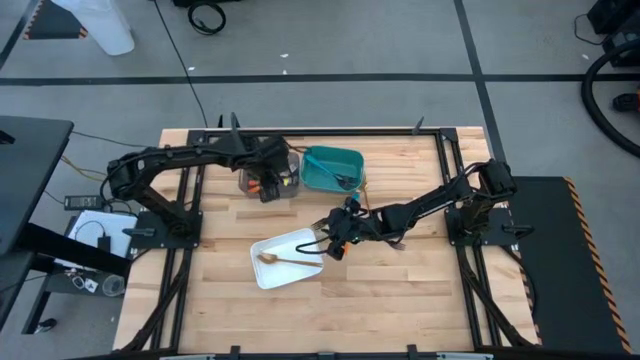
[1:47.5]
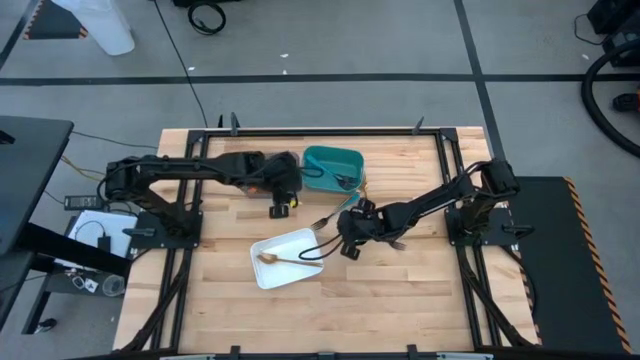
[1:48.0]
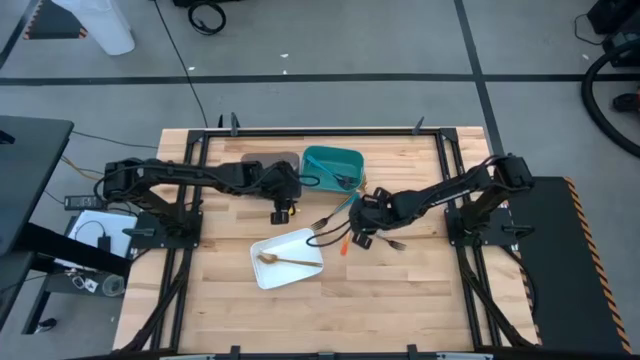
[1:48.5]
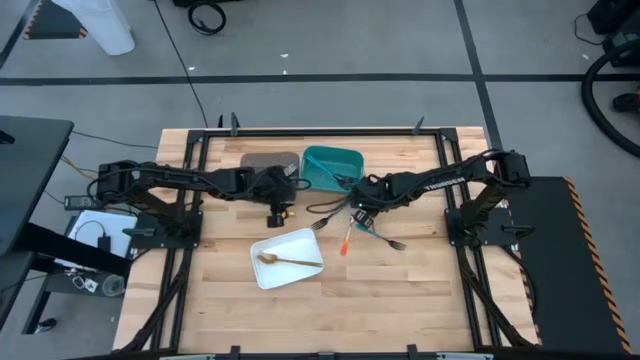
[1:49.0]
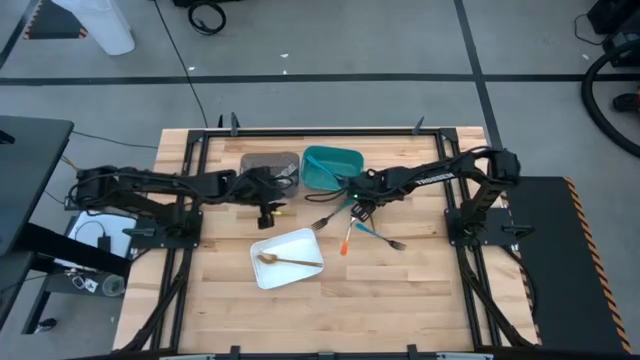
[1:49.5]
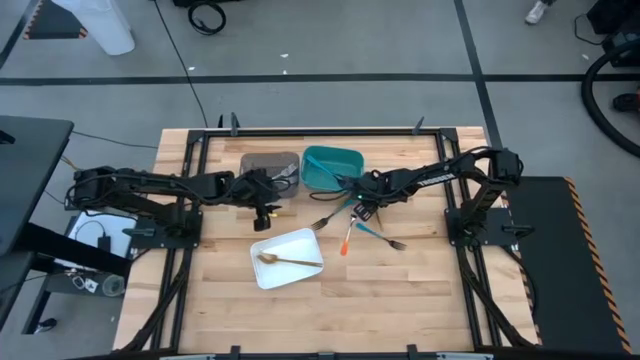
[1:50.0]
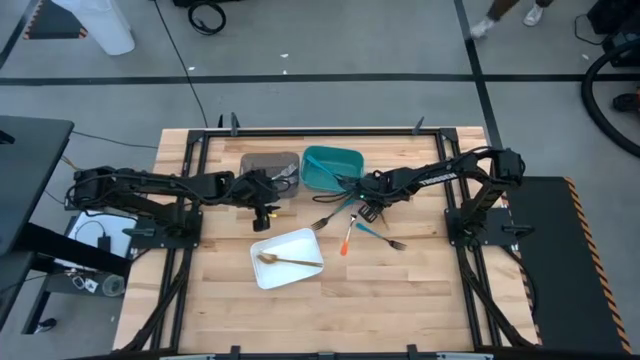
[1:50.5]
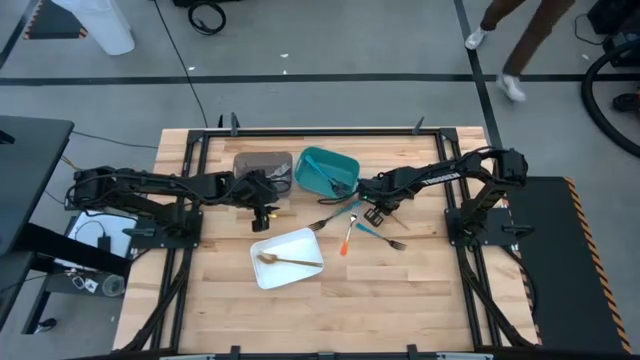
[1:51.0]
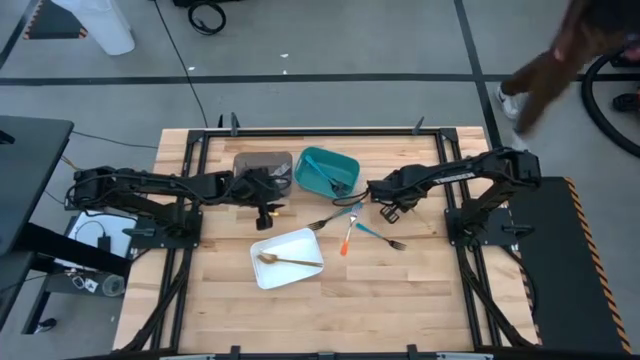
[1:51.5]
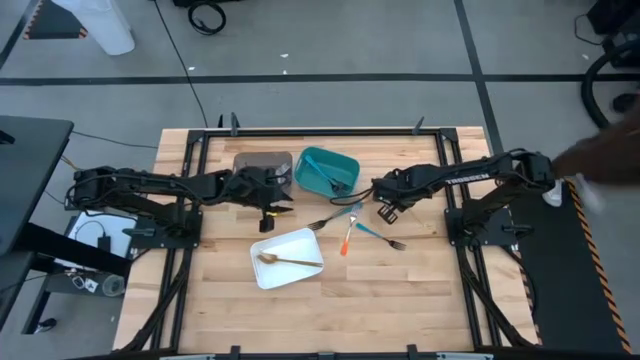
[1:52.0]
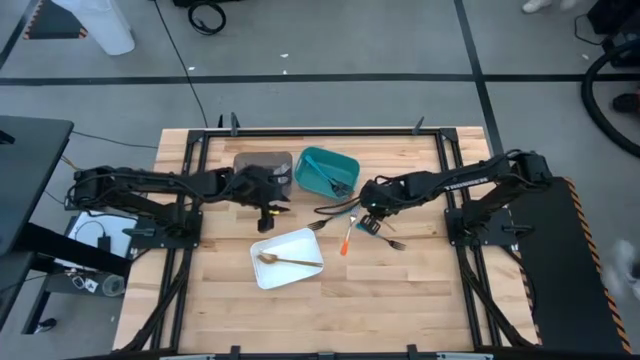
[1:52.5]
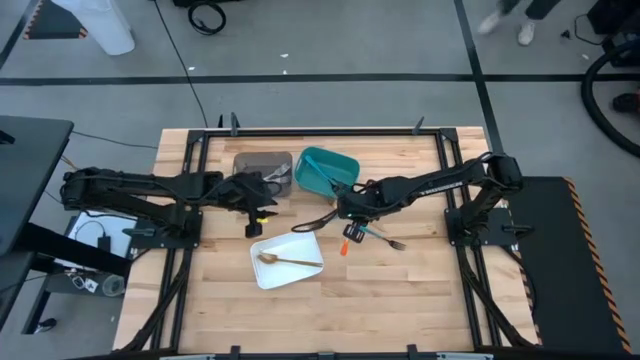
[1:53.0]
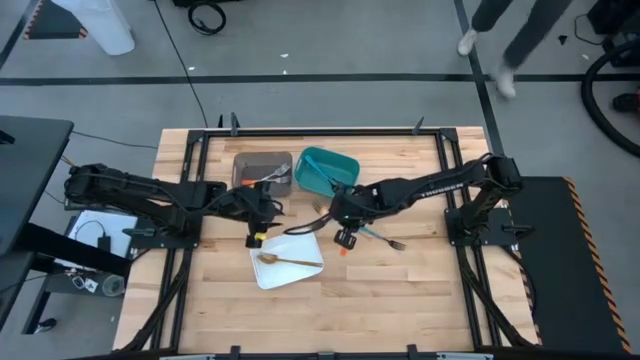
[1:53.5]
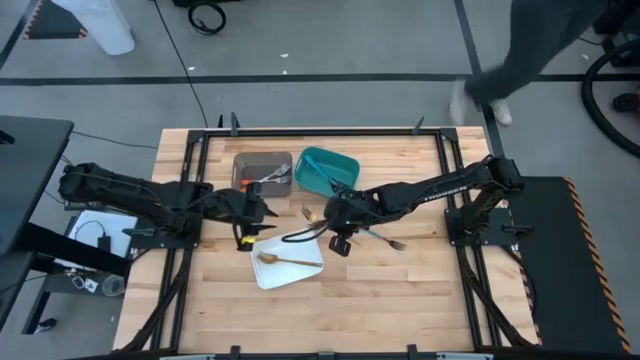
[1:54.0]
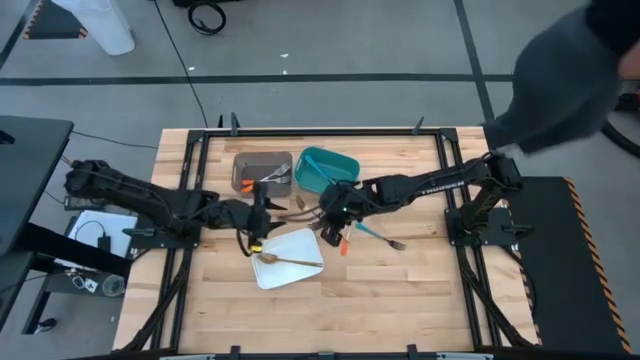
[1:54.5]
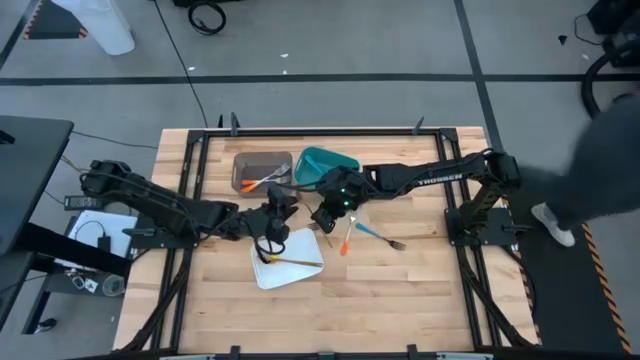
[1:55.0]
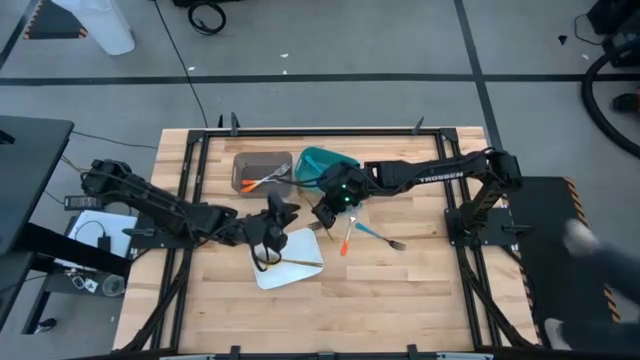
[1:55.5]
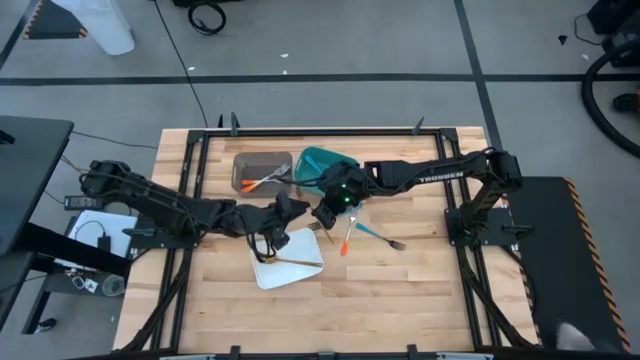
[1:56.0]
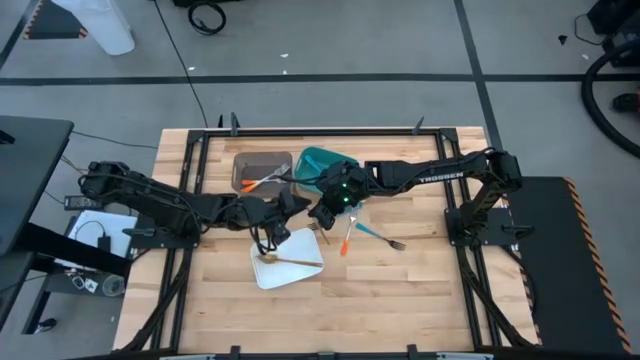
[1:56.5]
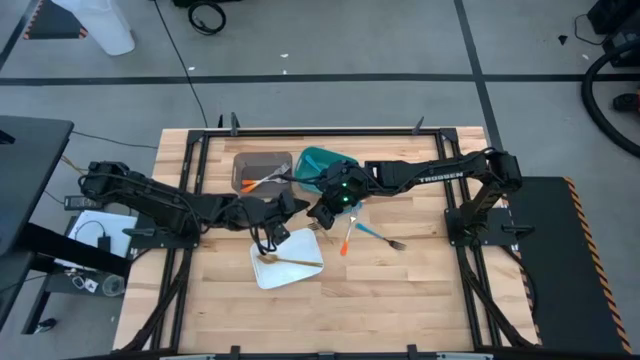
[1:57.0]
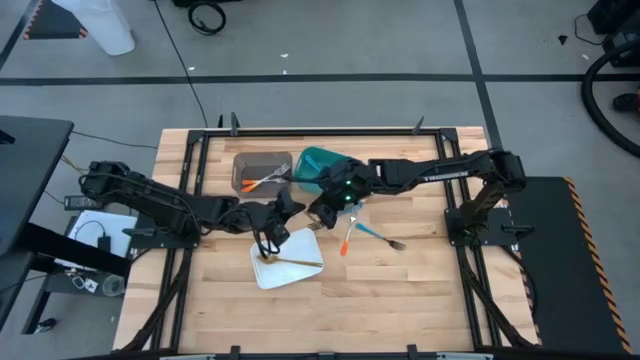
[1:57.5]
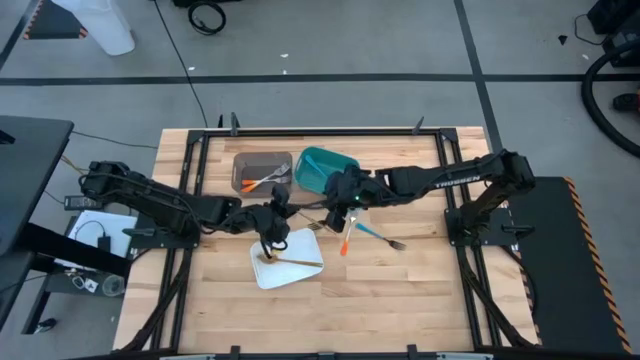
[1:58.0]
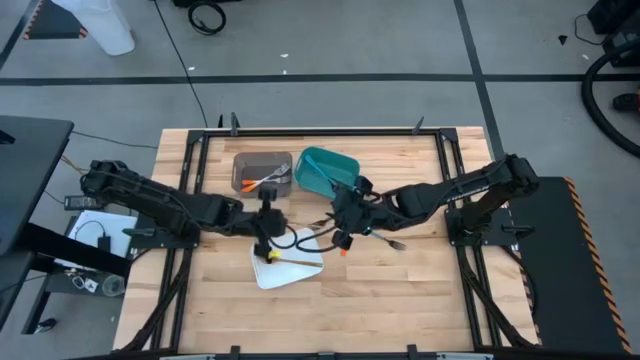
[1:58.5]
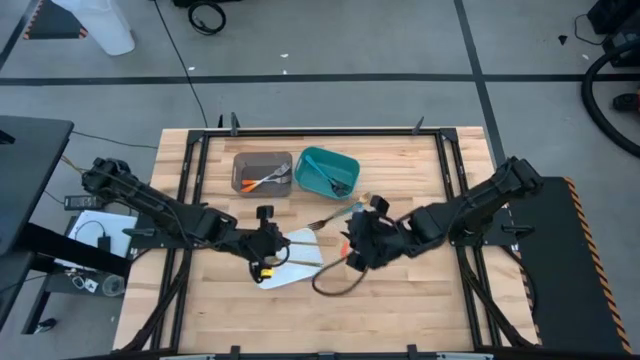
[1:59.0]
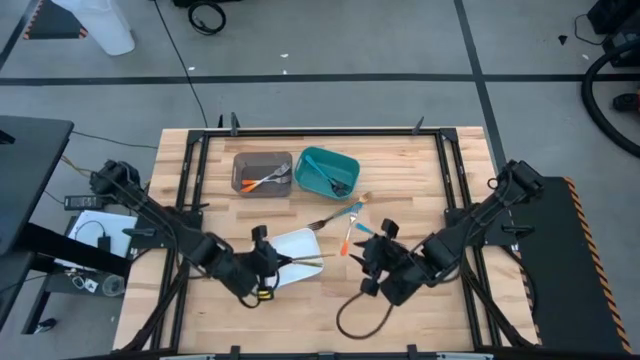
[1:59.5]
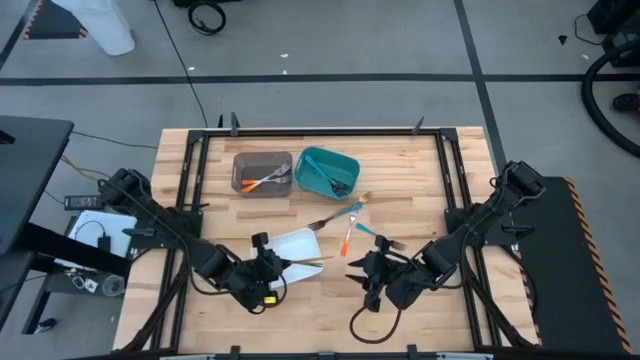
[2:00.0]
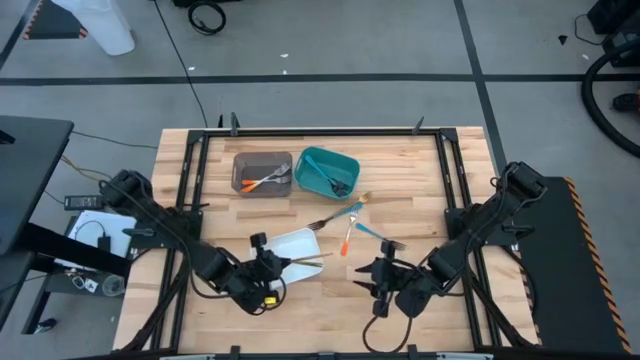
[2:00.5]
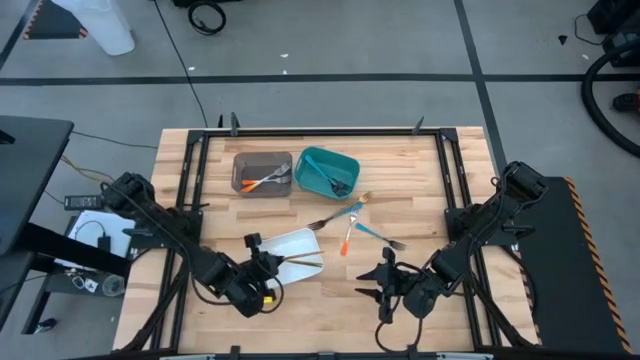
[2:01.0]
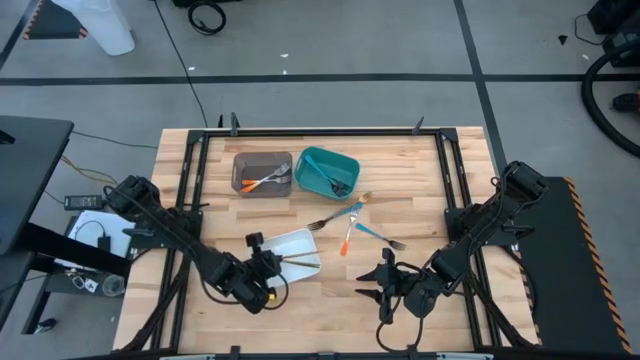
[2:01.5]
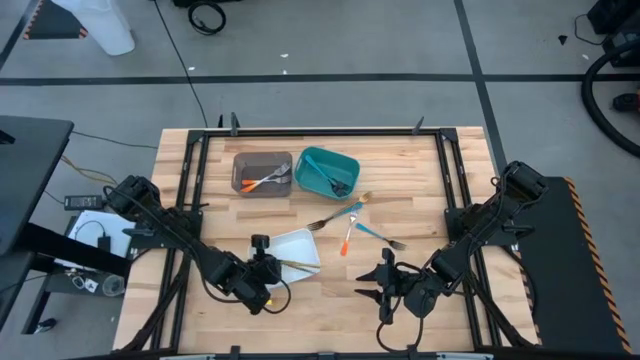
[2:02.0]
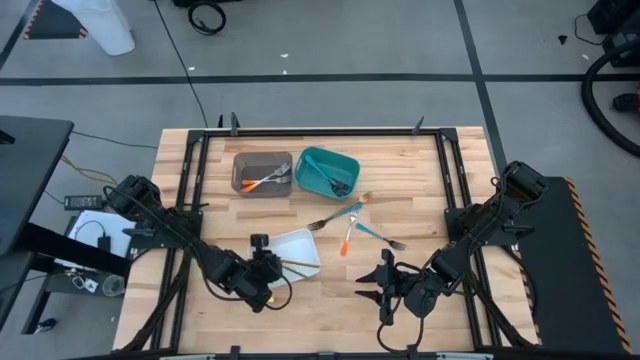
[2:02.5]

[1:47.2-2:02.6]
Task: Sort silverware by color (type)
Put the gold fork into the white bin

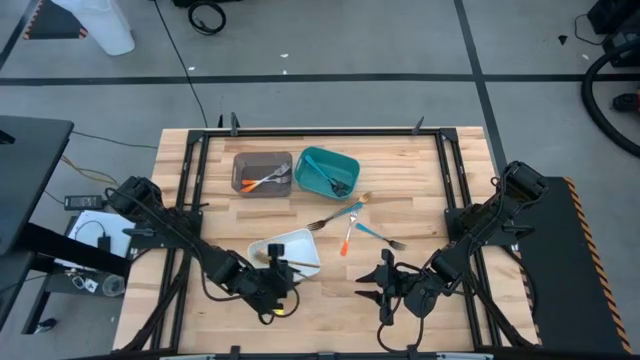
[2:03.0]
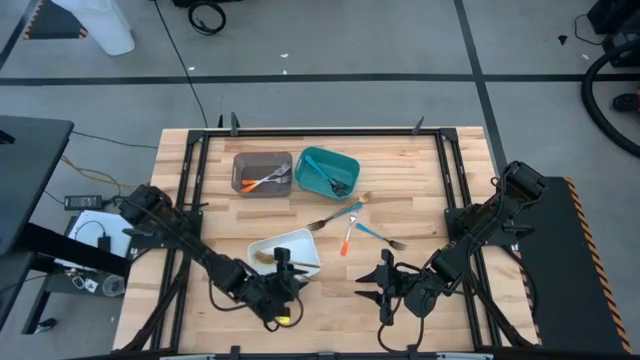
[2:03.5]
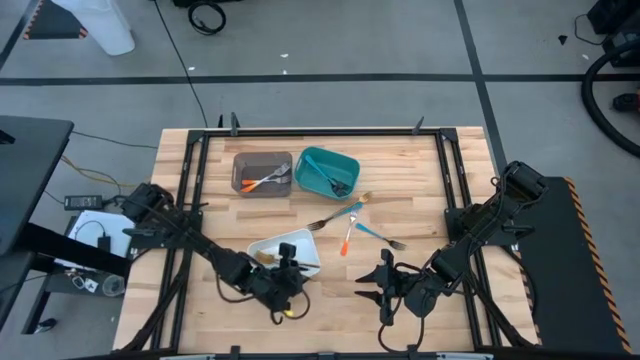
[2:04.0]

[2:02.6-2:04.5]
Adjust the gold fork in the white bin

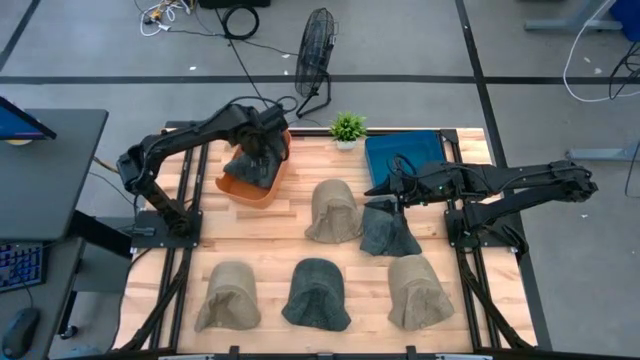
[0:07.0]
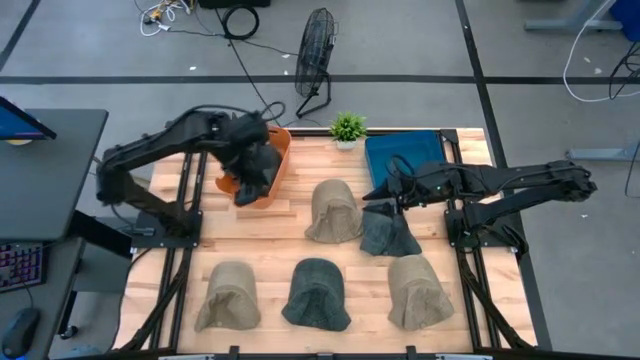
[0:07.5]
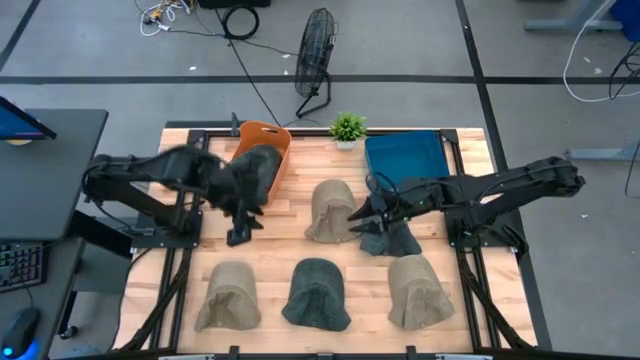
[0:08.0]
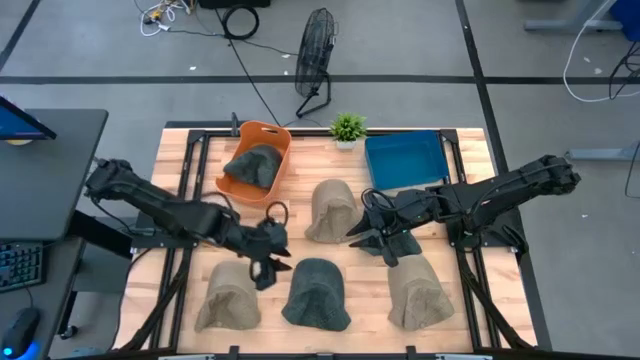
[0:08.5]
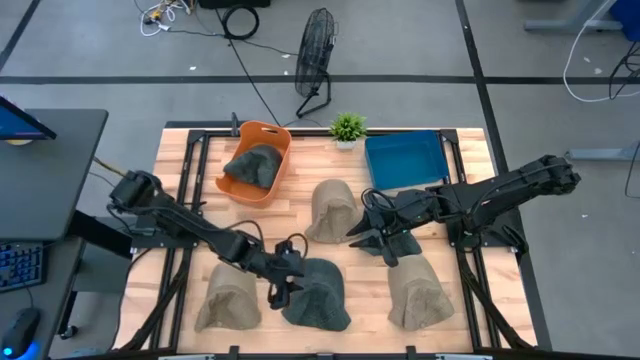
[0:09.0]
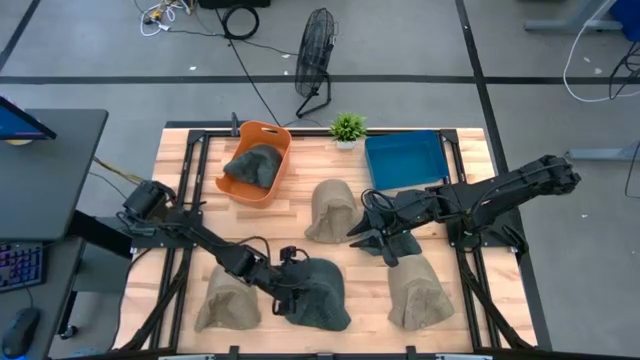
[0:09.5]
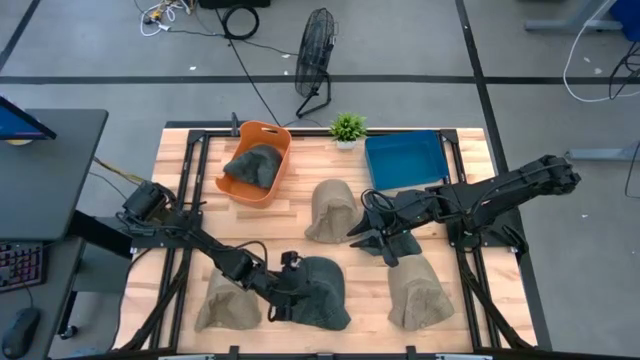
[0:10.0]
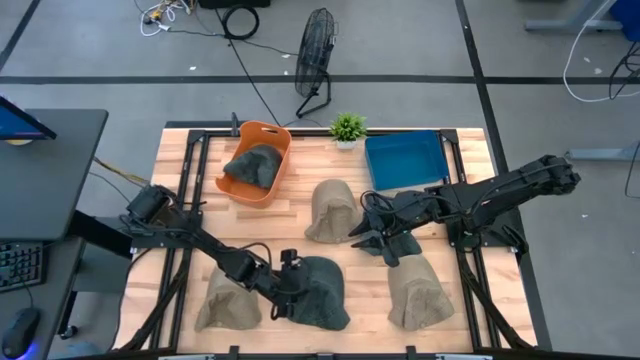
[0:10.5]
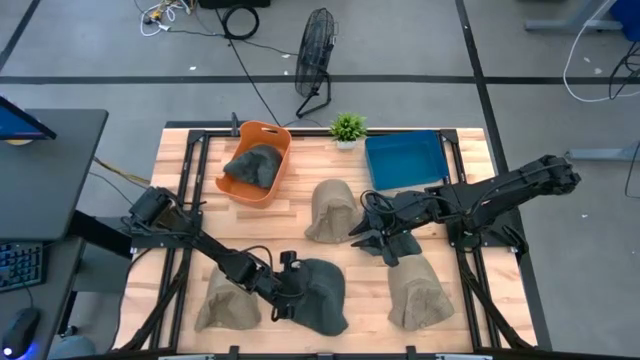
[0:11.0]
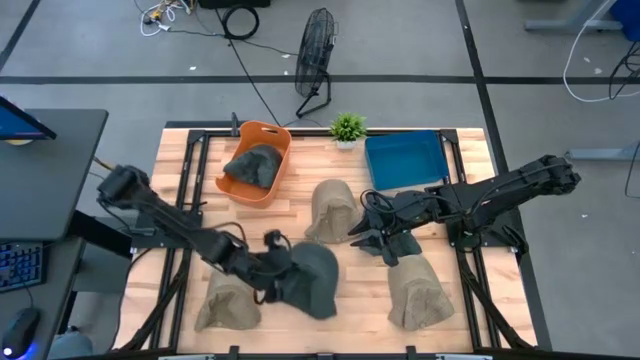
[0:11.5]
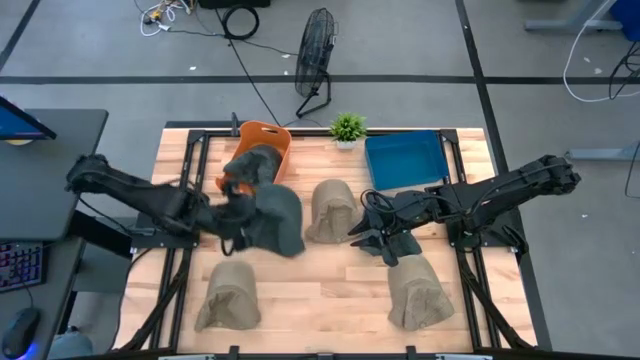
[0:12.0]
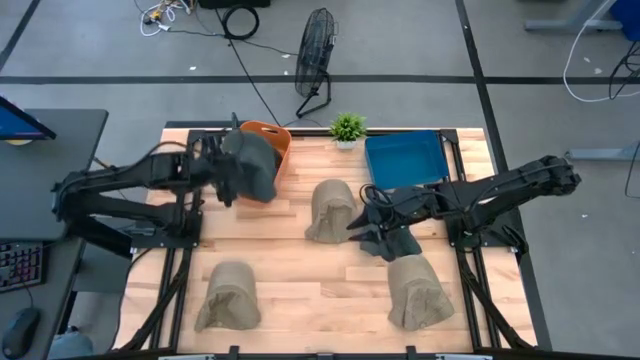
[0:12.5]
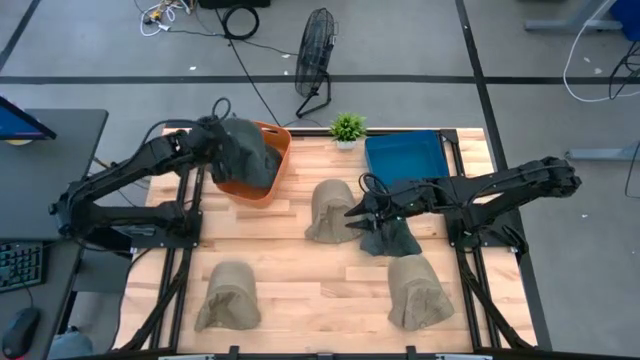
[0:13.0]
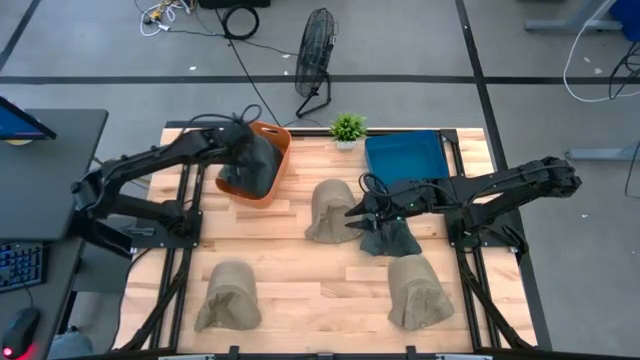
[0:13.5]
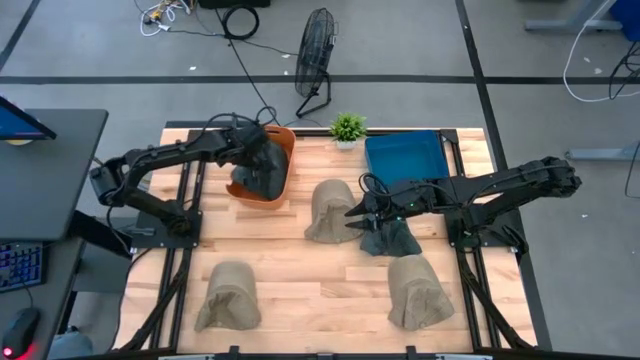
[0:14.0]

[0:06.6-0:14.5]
Task: Pick & Place hat
Put the bottom black cap into the orange bin
